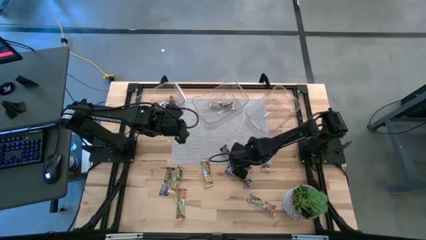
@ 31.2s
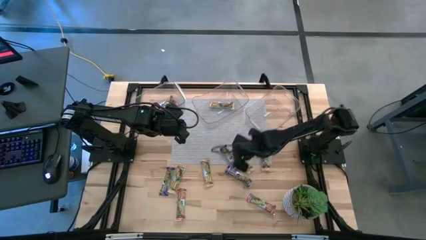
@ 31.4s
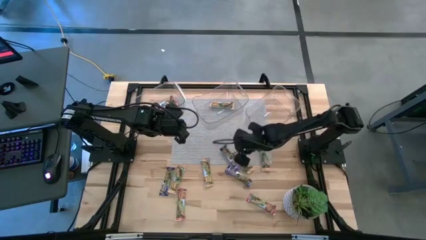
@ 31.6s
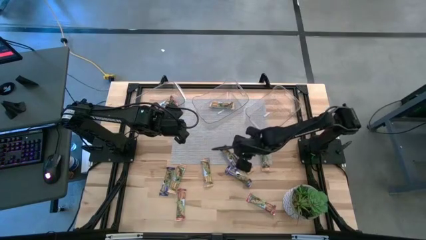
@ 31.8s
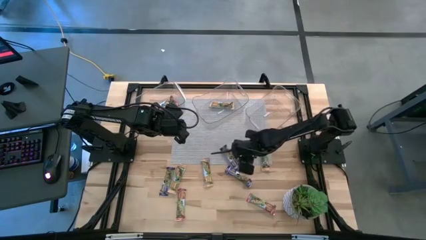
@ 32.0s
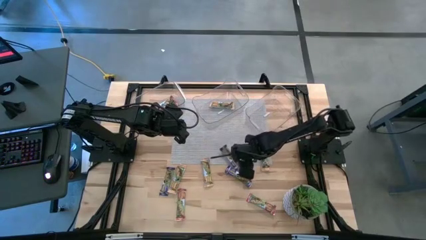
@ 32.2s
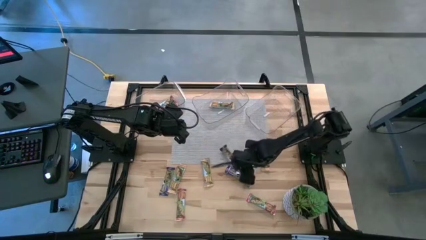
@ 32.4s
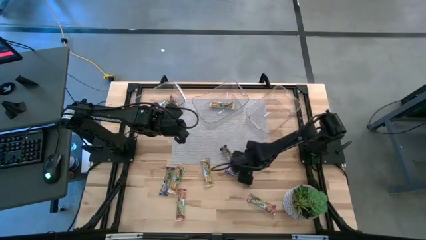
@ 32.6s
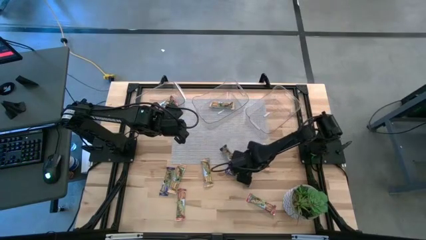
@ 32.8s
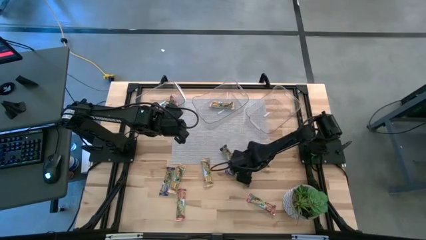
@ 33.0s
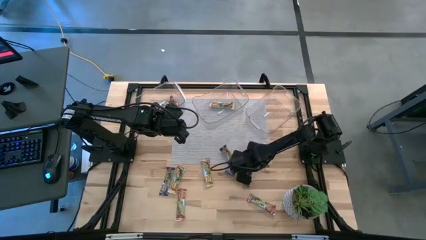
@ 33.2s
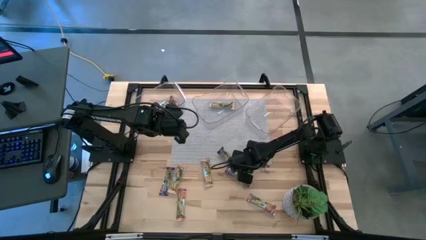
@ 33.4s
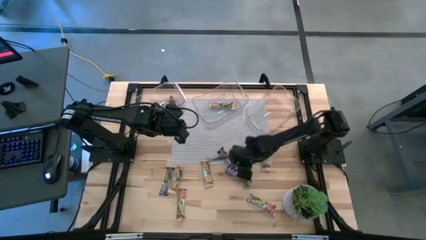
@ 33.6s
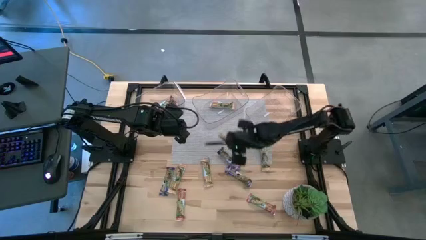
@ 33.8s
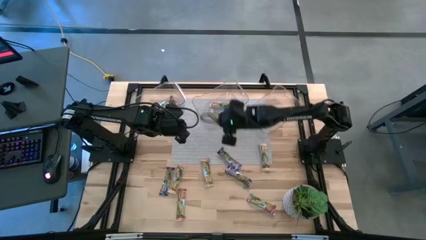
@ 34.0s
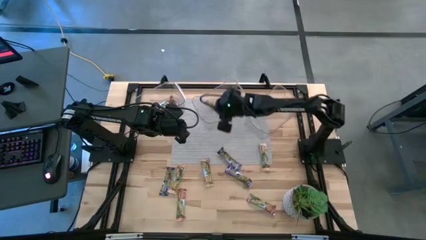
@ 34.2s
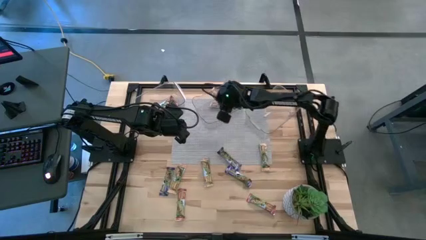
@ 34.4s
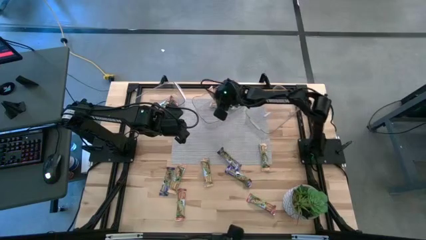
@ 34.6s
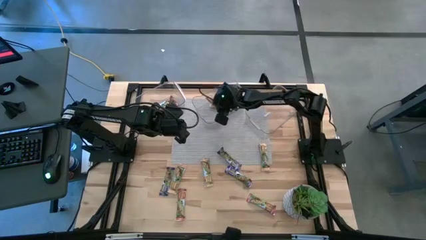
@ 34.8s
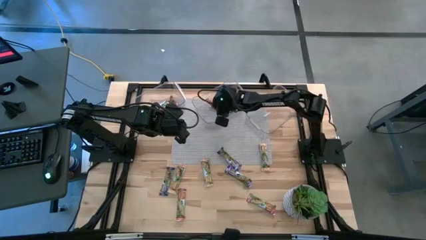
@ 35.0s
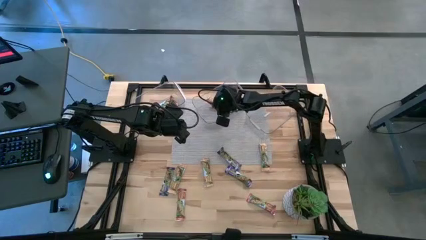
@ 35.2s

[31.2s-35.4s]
Task: Pick and place Granola Bars by type
Put the yellow granola bar into the middle transparent bin

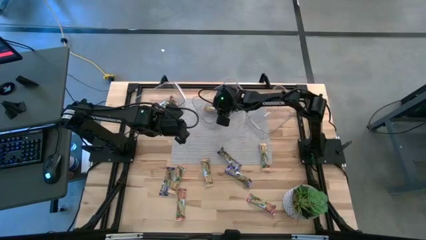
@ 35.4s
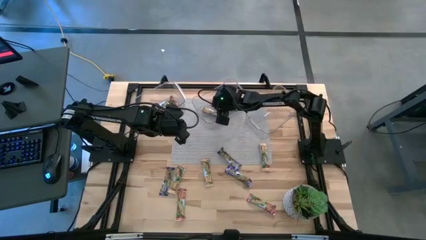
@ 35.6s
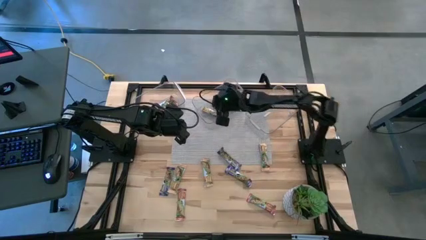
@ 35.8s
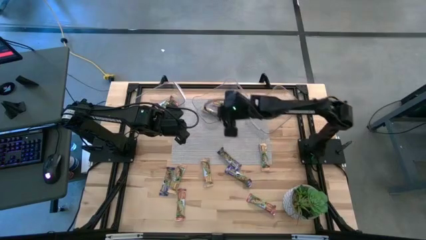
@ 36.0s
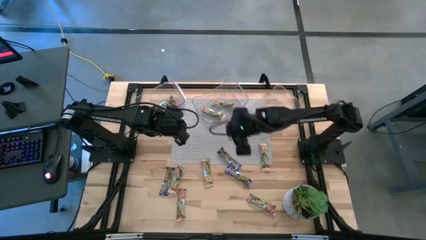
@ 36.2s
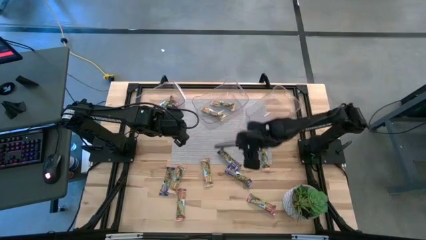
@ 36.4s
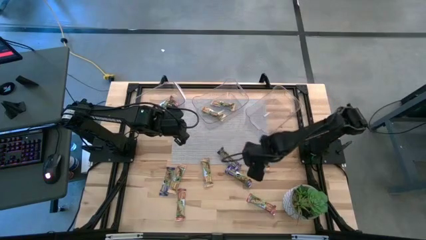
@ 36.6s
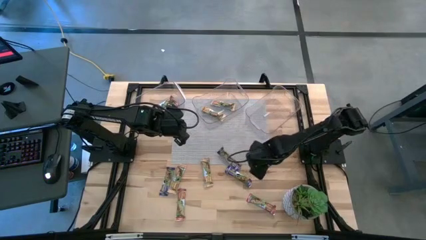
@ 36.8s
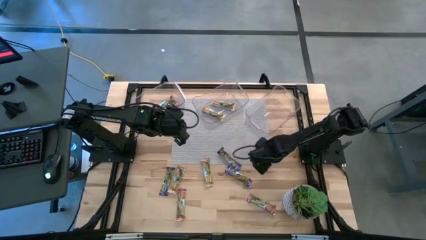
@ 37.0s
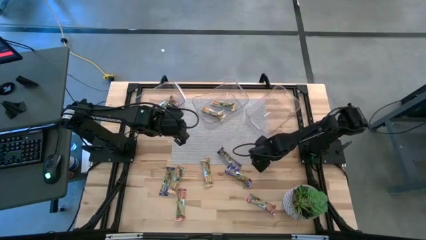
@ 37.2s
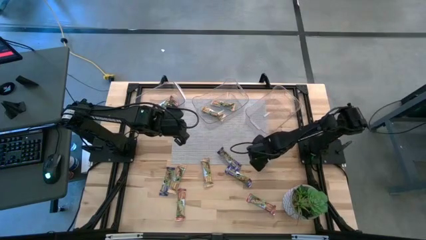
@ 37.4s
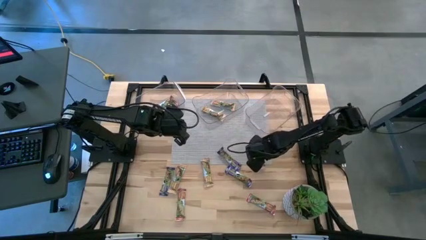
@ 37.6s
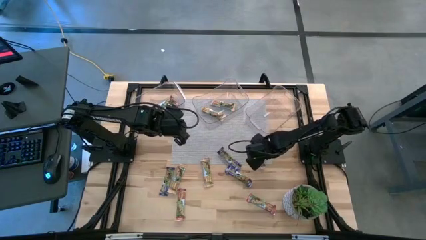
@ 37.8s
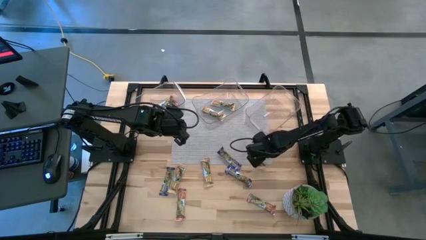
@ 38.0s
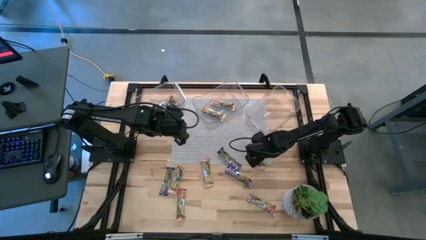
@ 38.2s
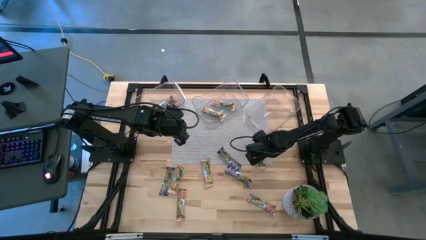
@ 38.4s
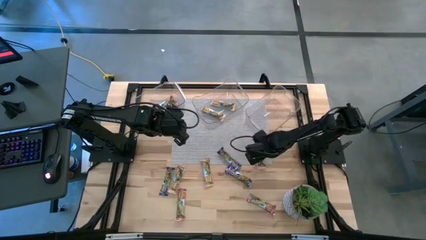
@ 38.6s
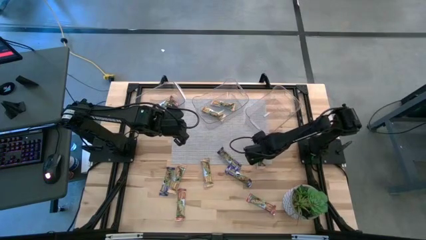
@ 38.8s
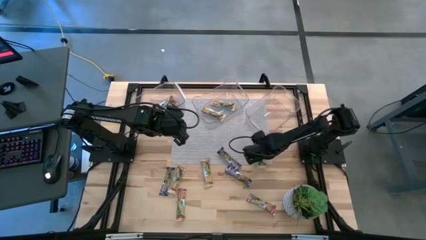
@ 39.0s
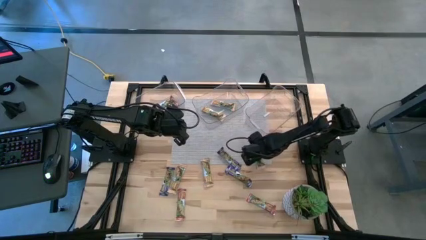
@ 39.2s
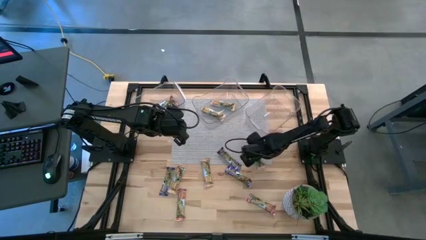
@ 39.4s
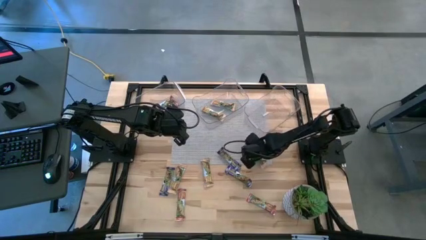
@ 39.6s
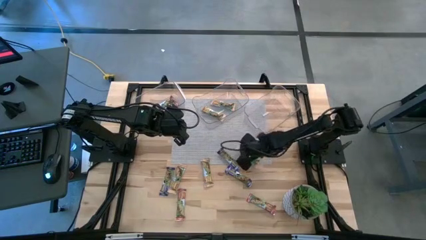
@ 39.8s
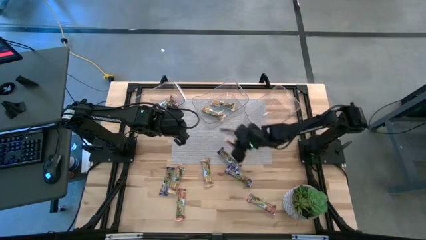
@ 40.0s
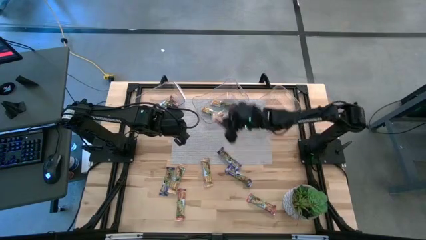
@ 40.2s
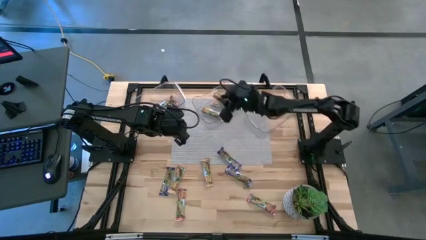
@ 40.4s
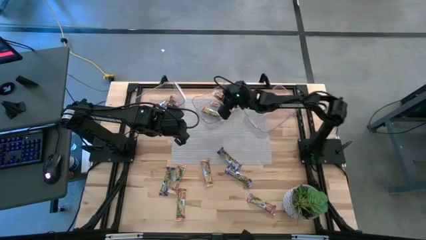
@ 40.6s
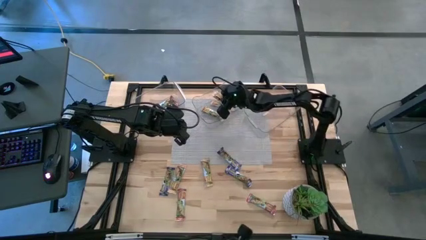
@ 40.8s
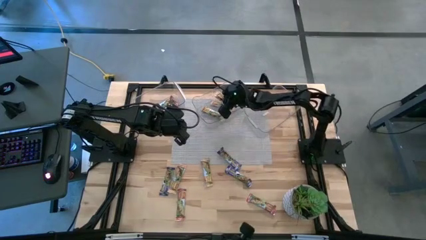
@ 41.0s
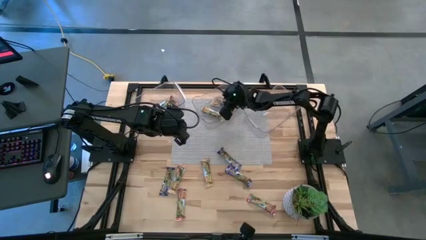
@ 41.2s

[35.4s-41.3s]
Put the yellow granola bar into the middle transparent bin

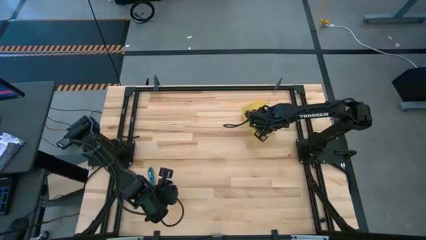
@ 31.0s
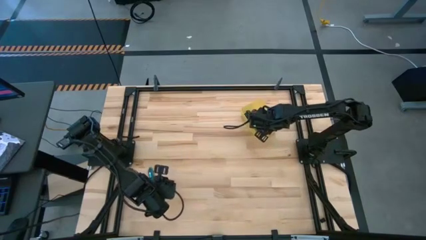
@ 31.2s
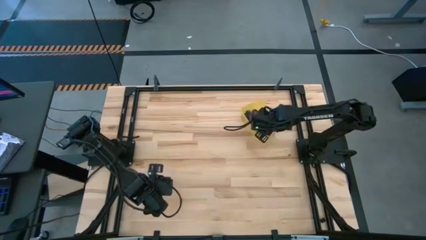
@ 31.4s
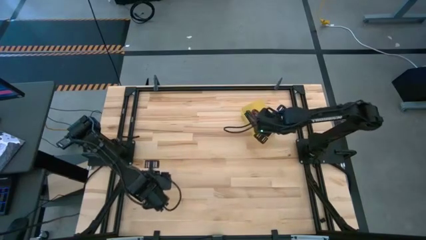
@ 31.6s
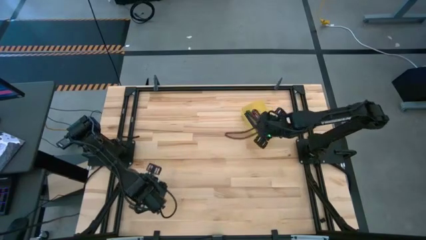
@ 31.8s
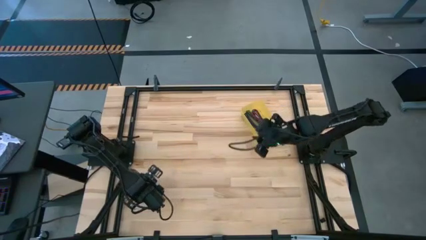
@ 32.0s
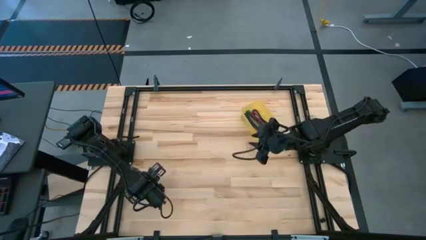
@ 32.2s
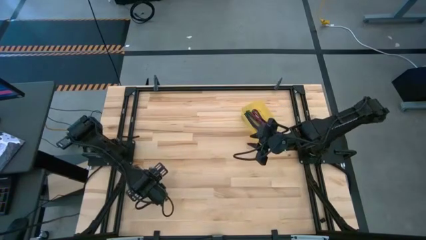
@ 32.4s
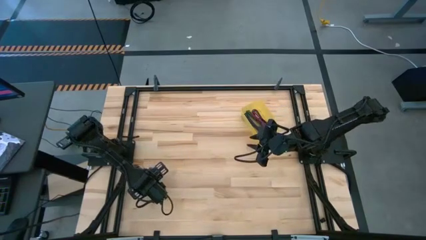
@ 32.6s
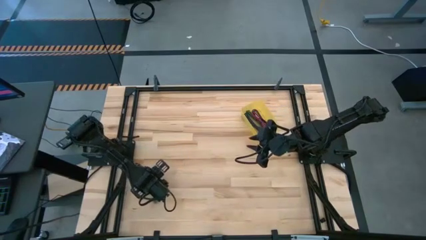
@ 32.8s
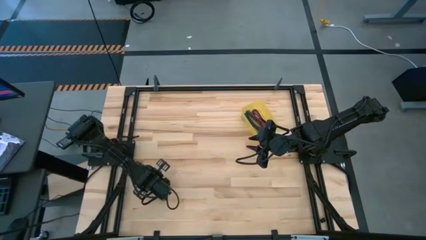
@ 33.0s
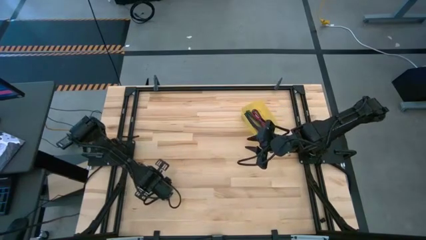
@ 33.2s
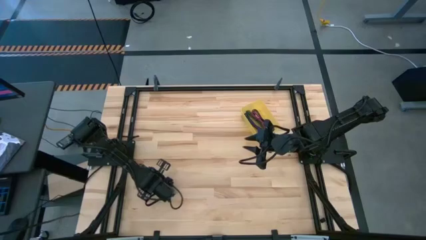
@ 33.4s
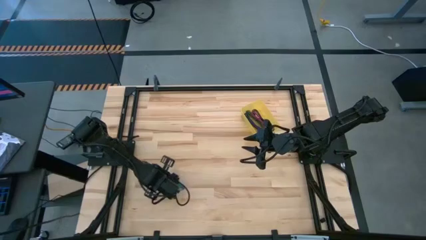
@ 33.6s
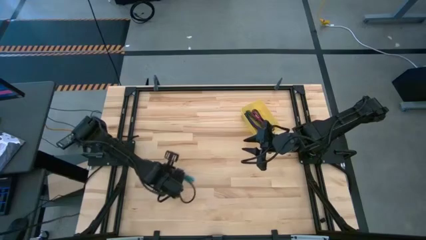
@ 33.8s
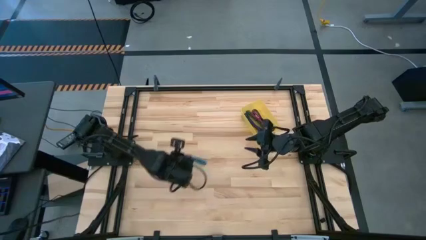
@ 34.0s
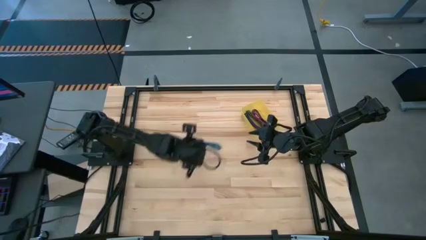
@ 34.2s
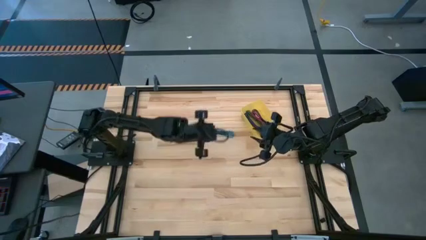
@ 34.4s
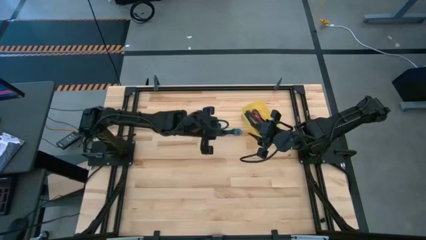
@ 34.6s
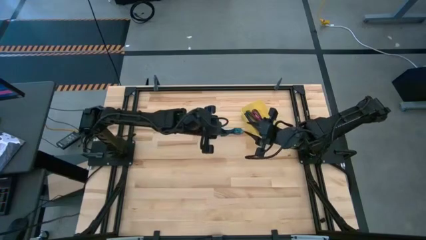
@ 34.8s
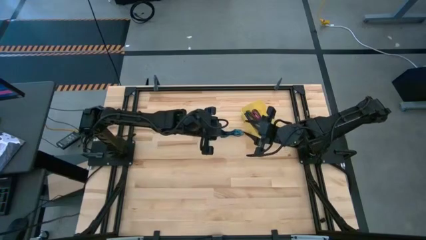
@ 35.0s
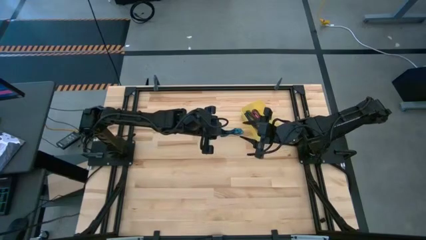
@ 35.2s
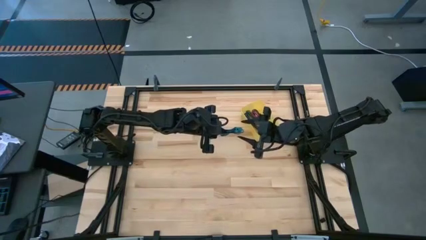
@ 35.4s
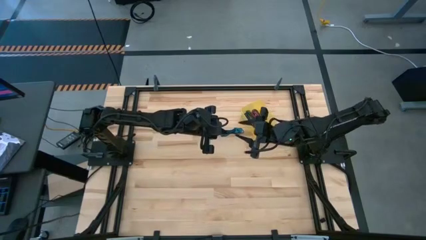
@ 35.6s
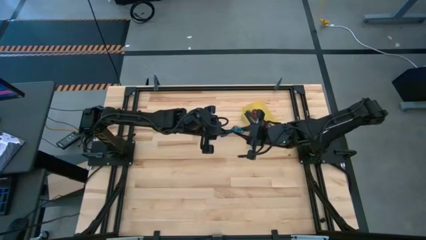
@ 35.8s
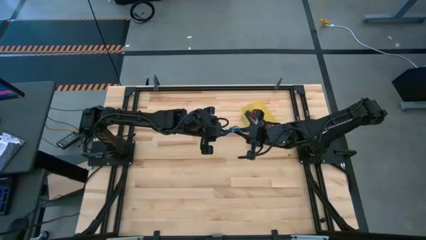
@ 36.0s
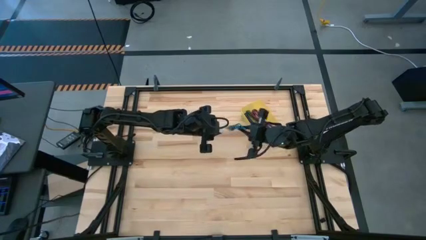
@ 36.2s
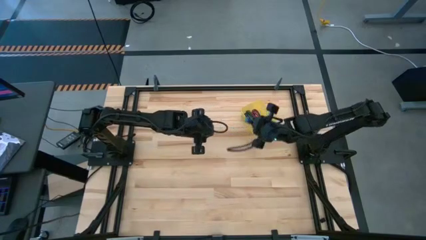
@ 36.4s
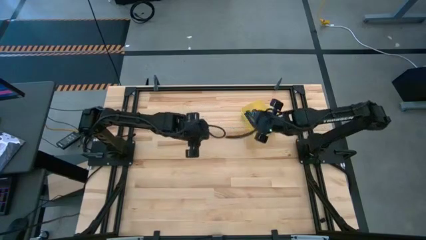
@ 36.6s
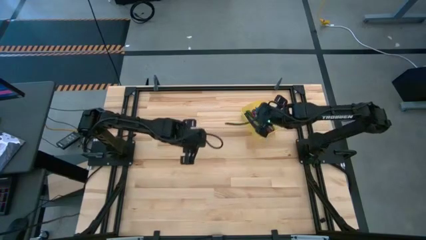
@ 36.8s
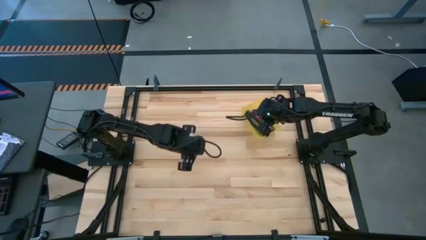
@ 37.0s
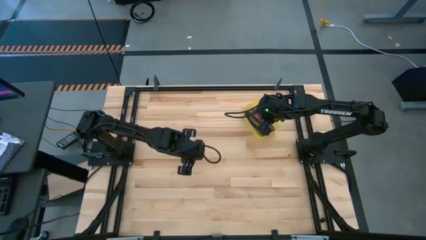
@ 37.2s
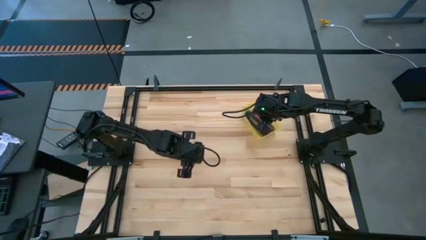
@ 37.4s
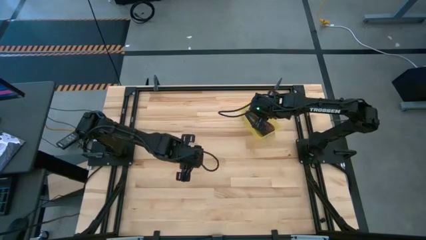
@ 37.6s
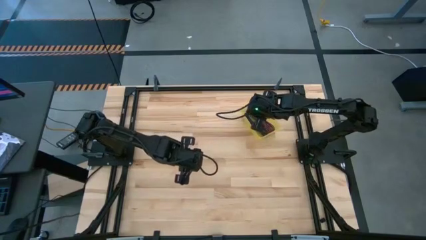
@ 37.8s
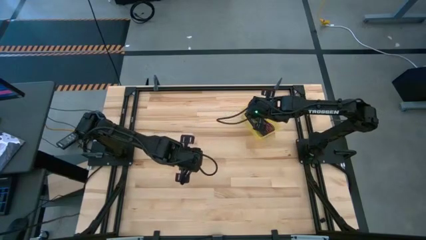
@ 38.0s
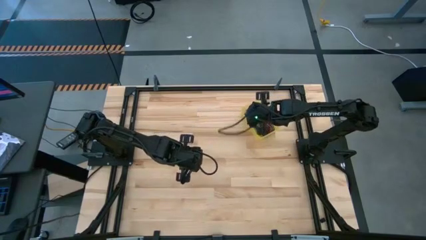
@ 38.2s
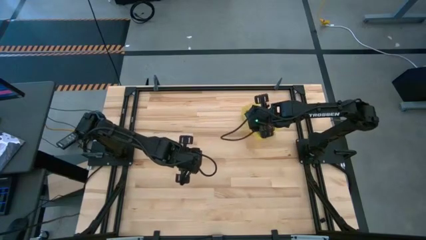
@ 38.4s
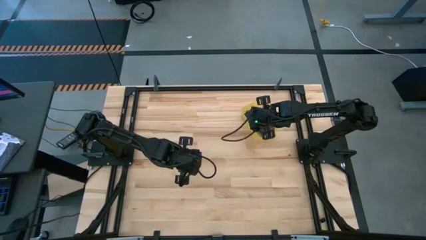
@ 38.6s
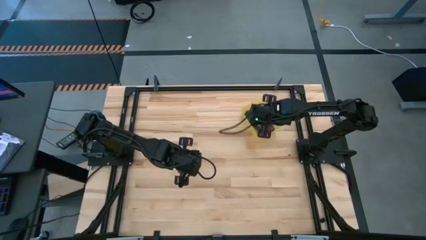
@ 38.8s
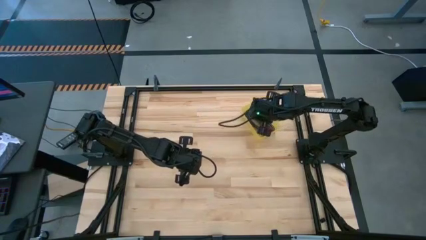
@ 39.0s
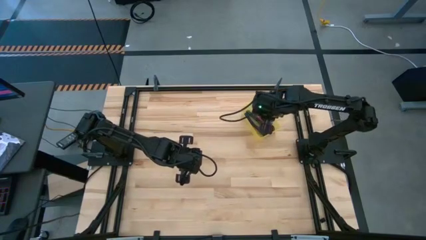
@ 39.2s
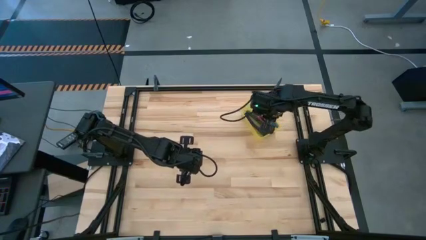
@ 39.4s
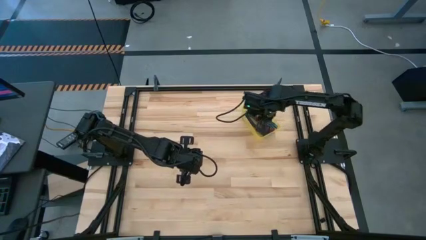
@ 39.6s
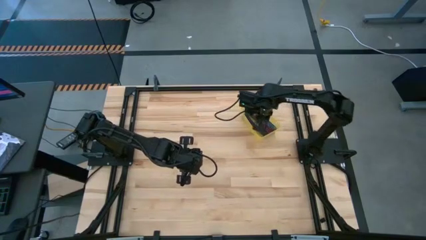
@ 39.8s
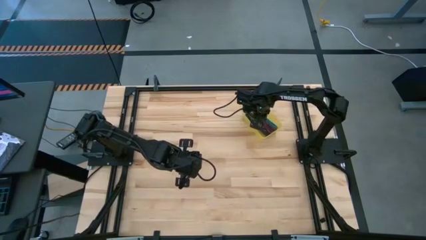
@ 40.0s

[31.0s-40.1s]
Task: Pick and place USB-C Cables
Put the blue and black charger cable into the yellow bin
